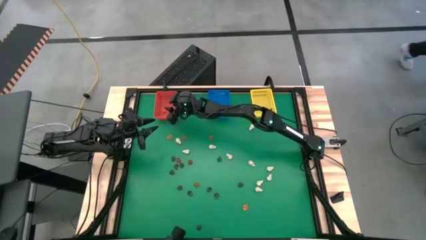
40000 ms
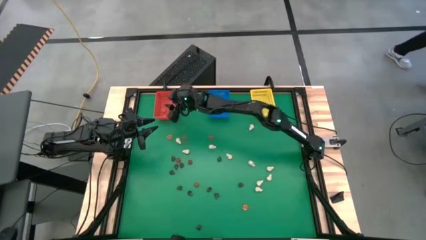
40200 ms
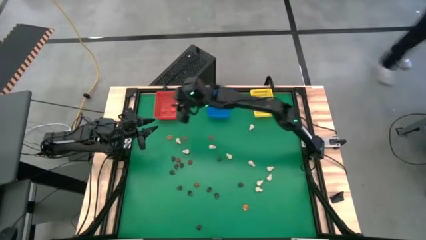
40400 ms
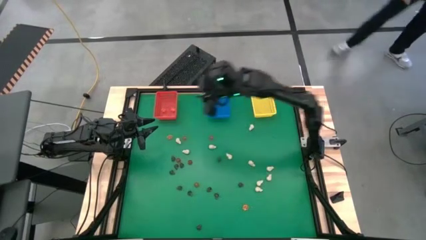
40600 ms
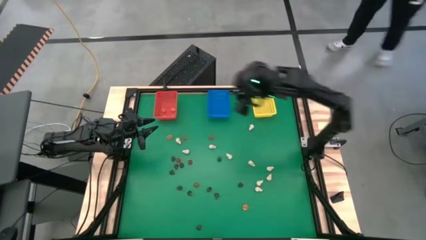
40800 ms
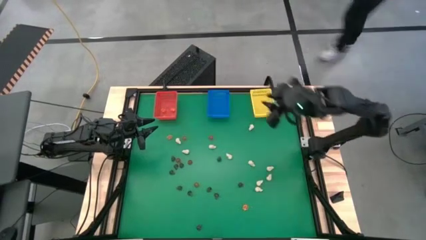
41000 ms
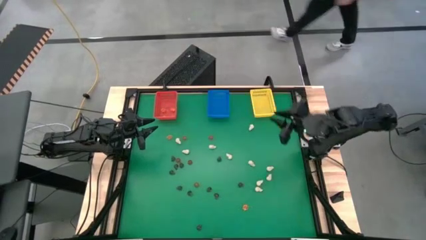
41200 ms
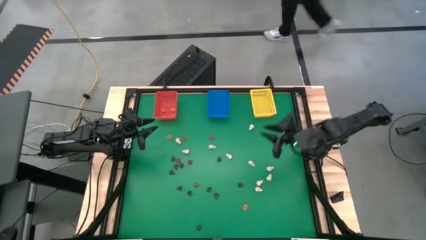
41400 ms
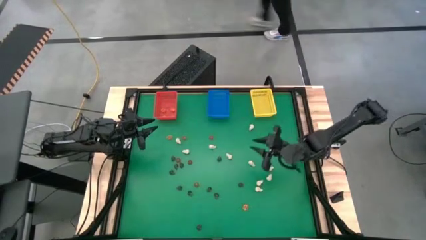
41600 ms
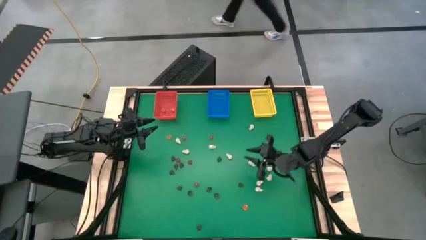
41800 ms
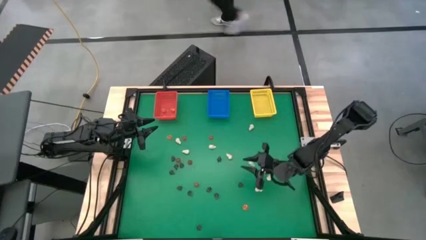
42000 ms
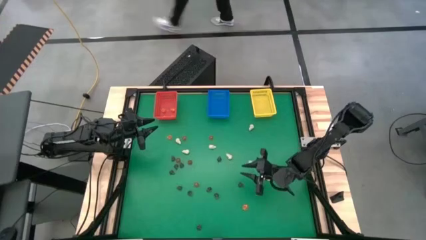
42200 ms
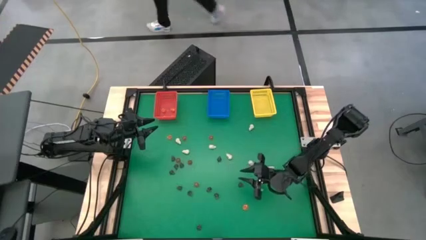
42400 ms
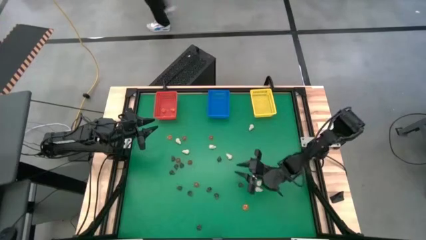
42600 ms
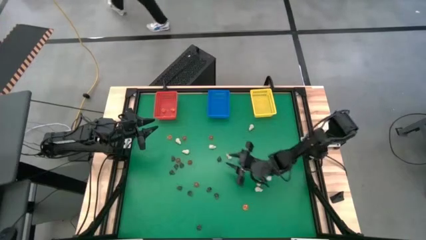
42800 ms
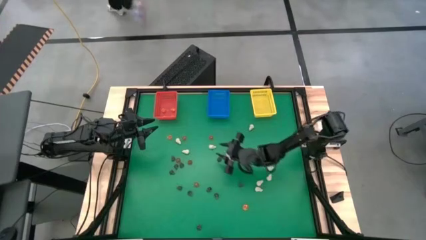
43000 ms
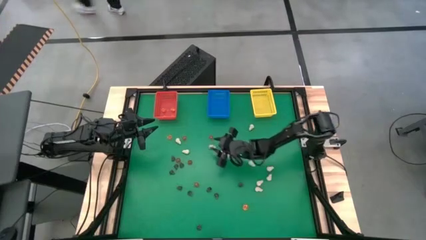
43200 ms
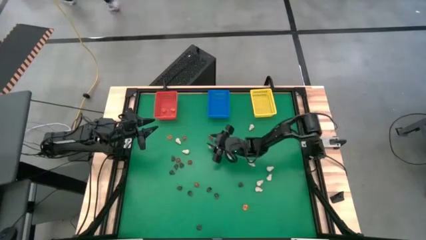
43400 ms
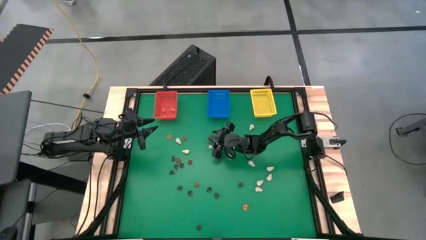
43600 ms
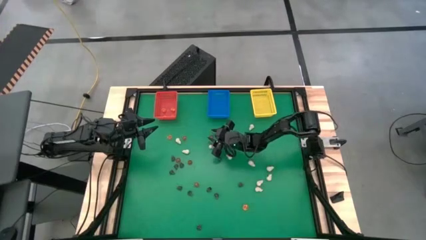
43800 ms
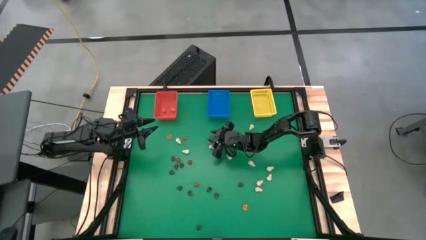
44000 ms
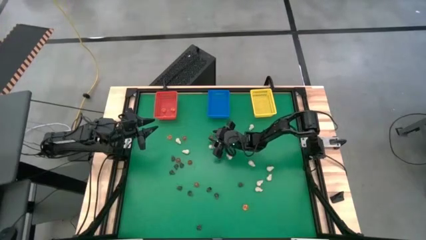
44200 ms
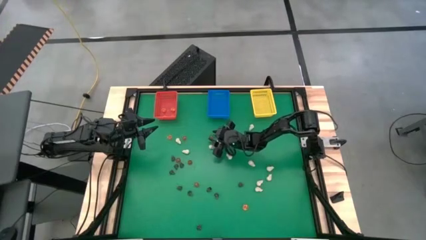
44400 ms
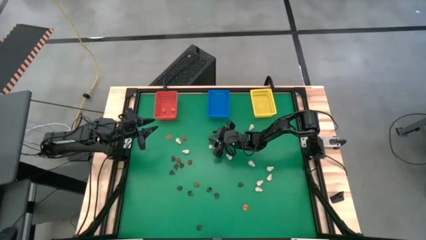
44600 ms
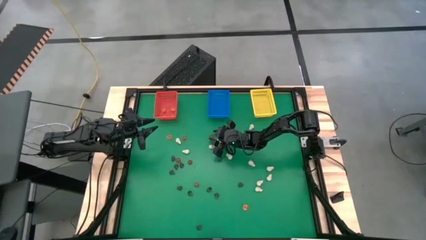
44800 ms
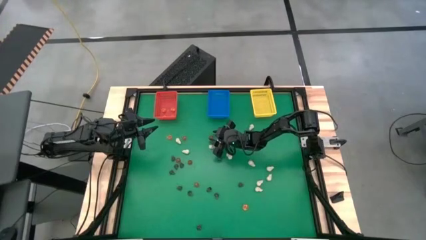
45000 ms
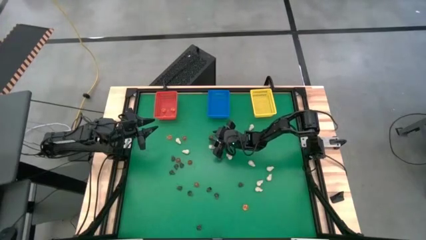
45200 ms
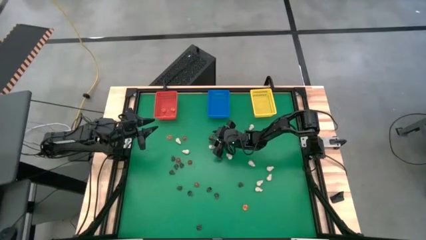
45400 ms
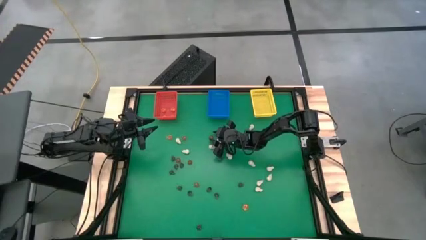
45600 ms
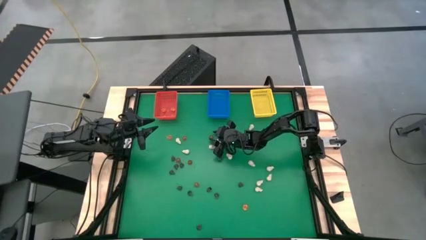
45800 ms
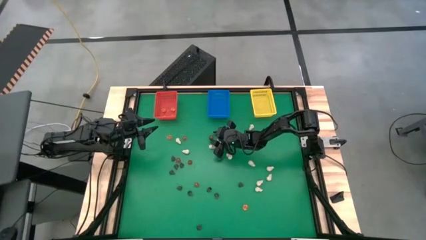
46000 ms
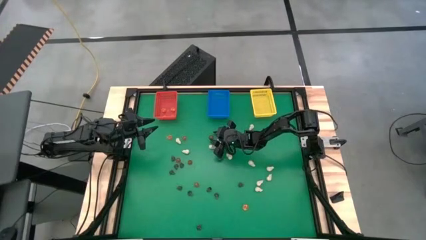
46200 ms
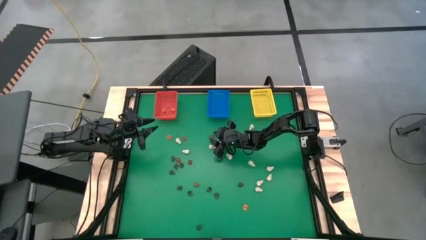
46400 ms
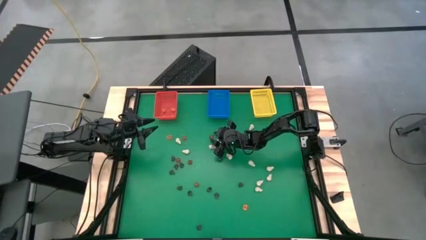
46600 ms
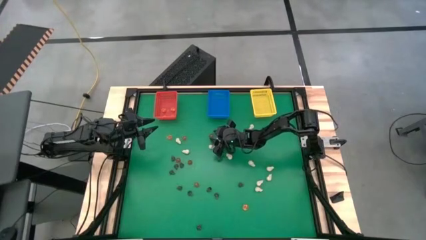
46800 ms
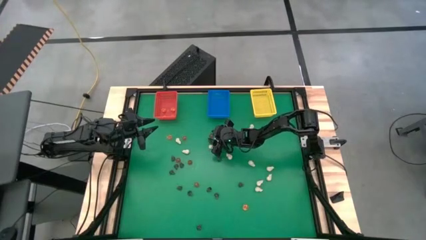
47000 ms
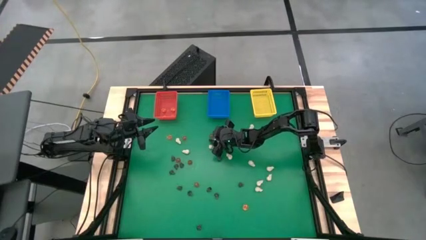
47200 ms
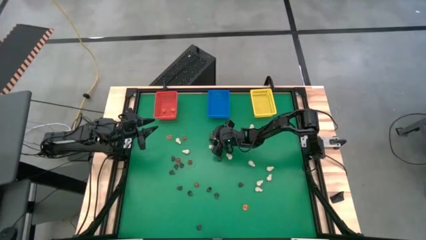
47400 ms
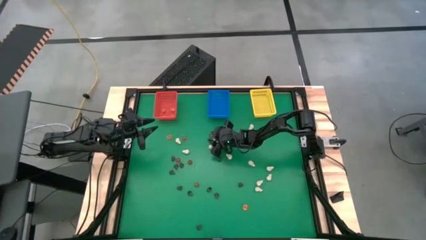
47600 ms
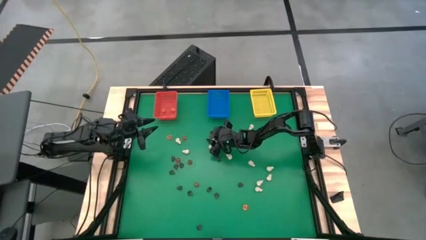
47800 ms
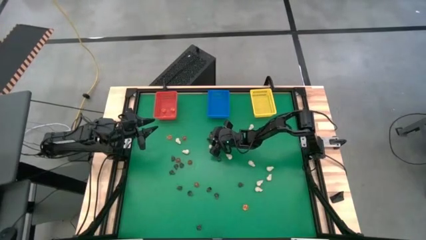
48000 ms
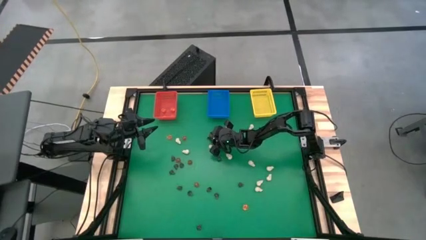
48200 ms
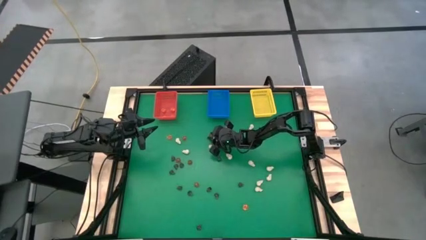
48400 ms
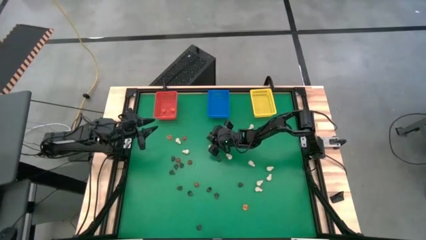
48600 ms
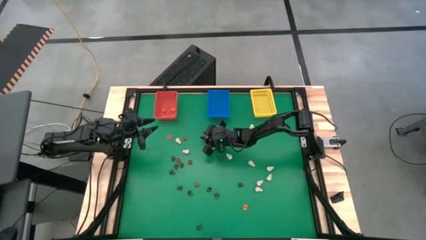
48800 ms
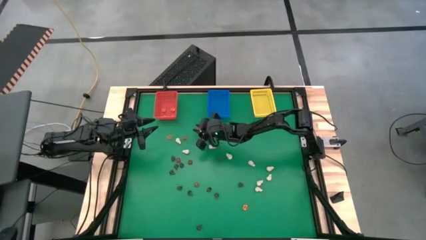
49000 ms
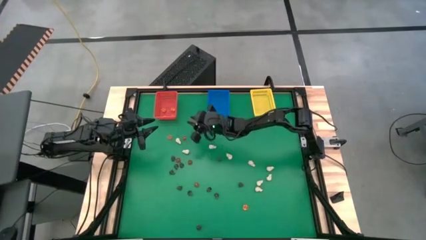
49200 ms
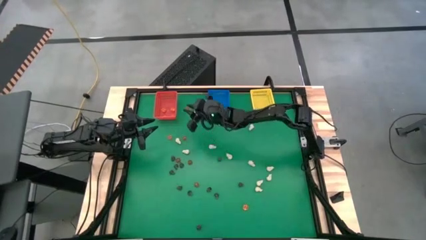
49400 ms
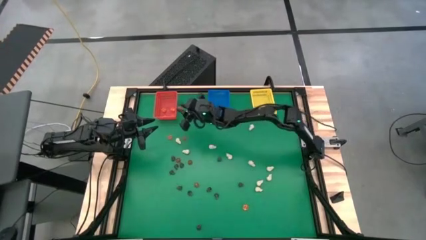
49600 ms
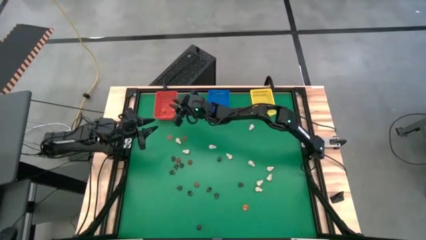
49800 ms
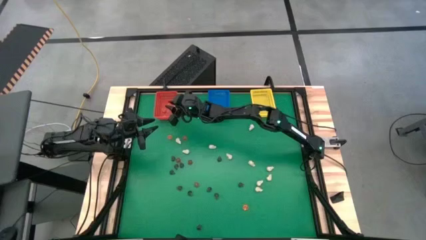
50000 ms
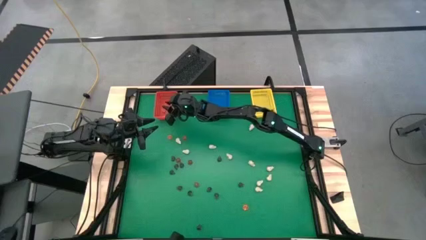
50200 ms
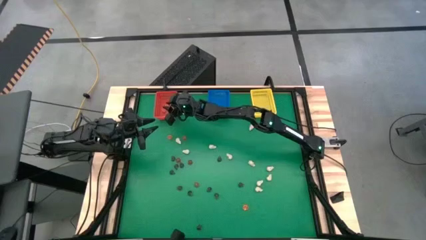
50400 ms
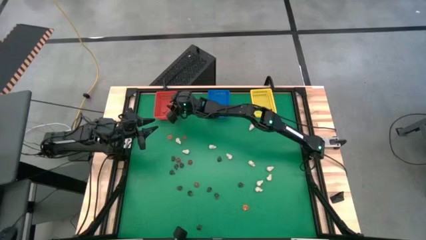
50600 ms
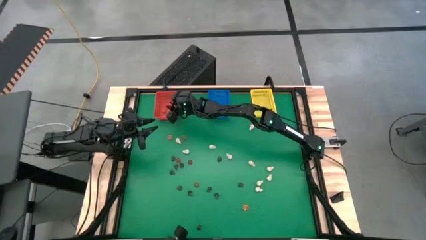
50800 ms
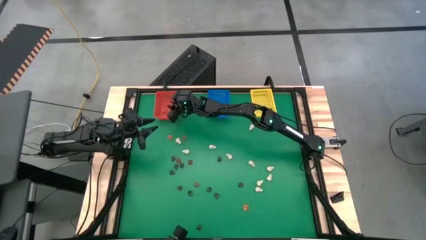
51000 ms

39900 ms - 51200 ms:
Task: Sort Halloween decoration
Put the orange pumpkin toy into the red bin
